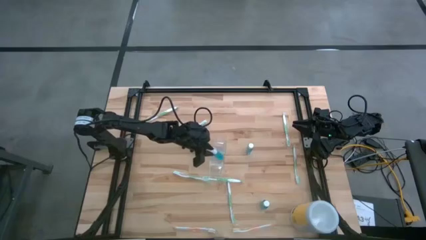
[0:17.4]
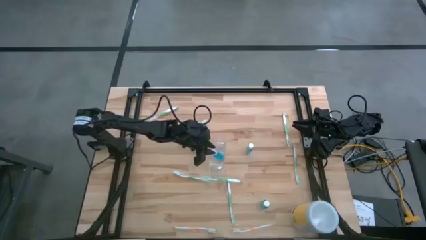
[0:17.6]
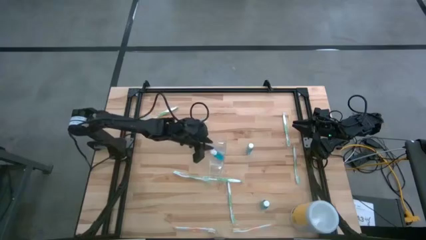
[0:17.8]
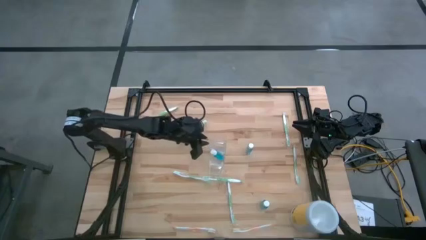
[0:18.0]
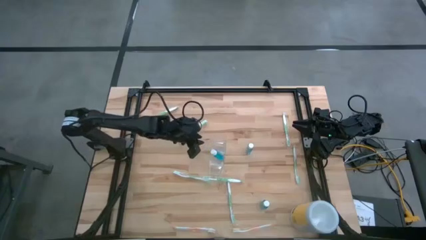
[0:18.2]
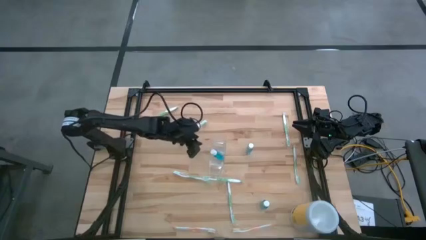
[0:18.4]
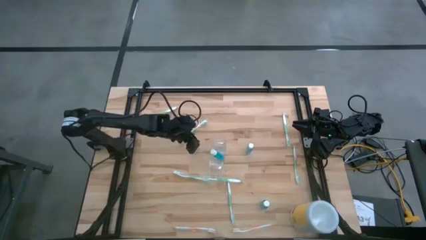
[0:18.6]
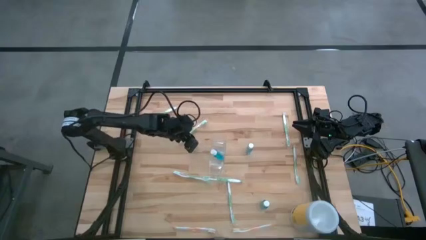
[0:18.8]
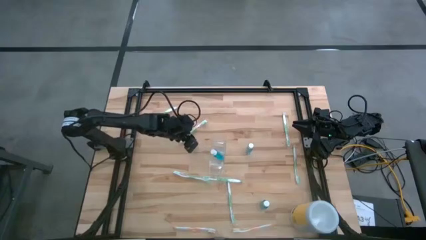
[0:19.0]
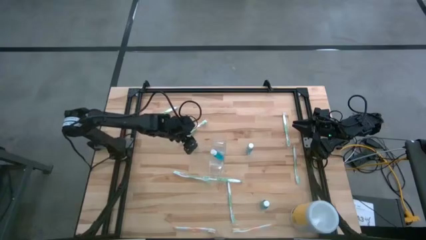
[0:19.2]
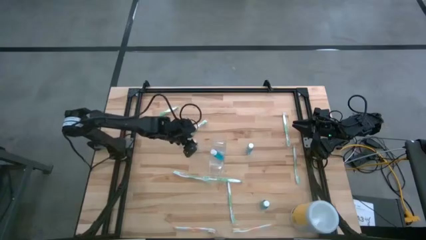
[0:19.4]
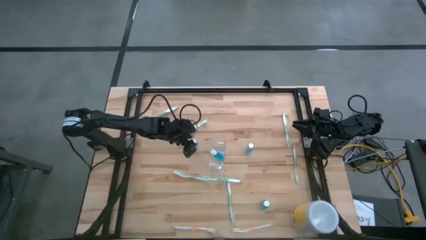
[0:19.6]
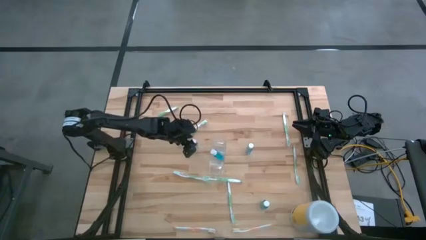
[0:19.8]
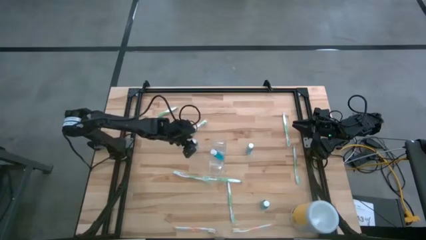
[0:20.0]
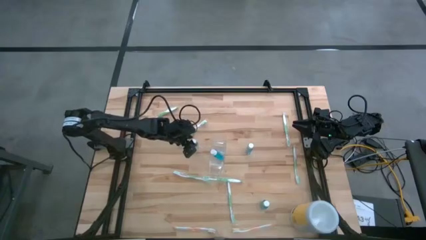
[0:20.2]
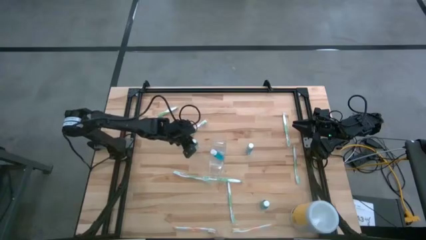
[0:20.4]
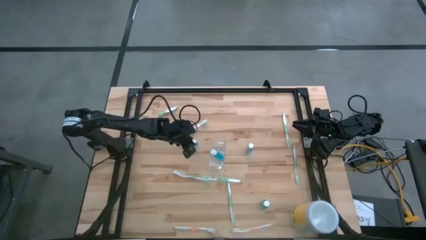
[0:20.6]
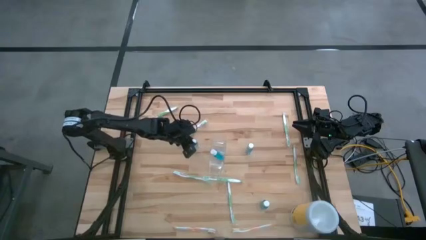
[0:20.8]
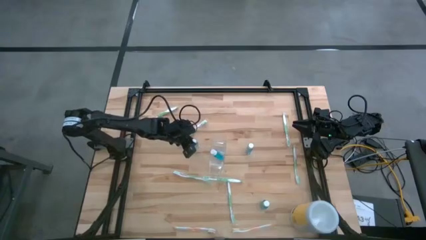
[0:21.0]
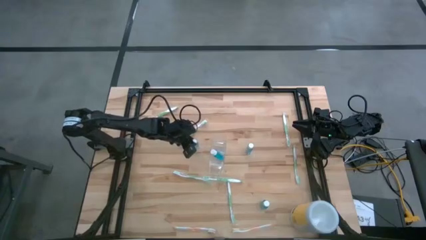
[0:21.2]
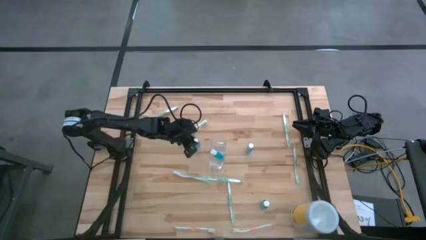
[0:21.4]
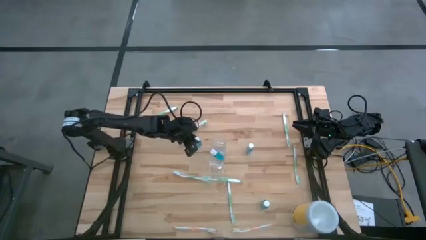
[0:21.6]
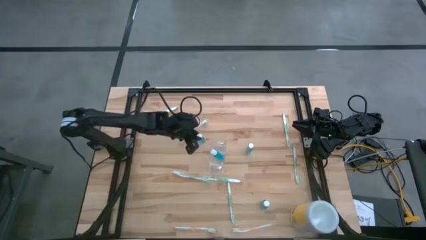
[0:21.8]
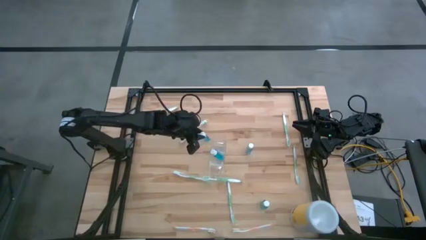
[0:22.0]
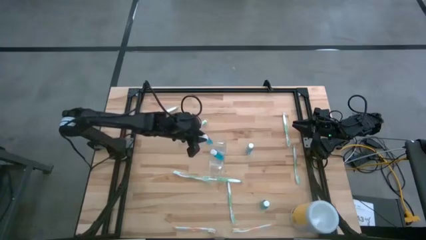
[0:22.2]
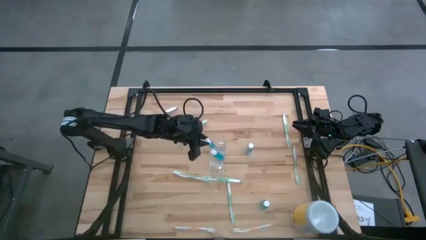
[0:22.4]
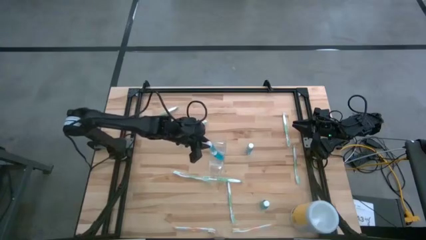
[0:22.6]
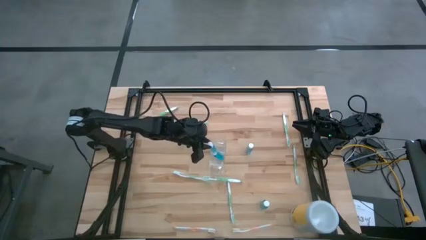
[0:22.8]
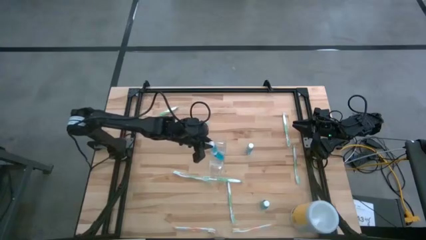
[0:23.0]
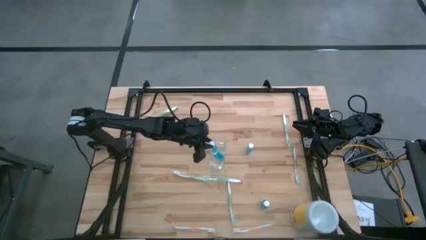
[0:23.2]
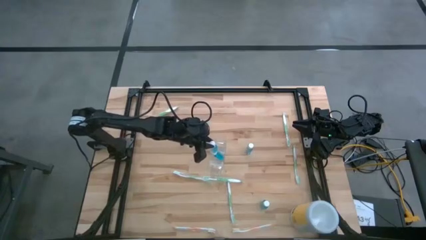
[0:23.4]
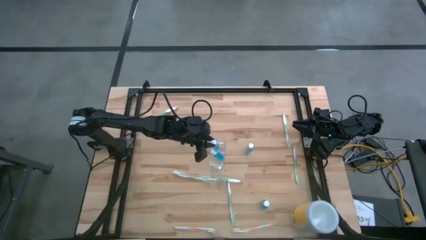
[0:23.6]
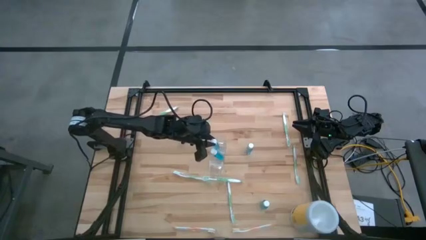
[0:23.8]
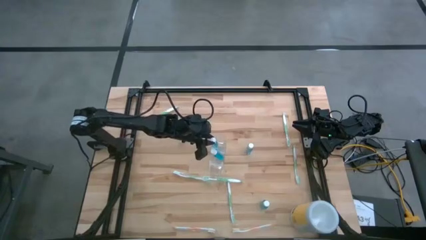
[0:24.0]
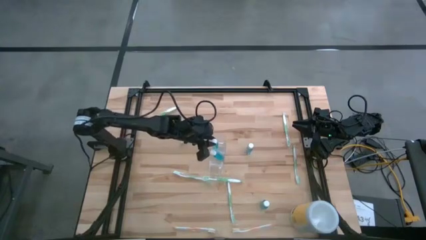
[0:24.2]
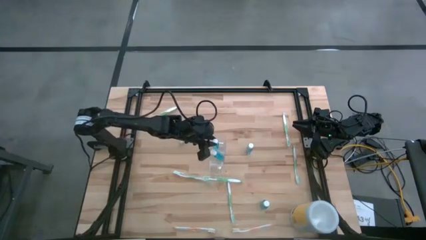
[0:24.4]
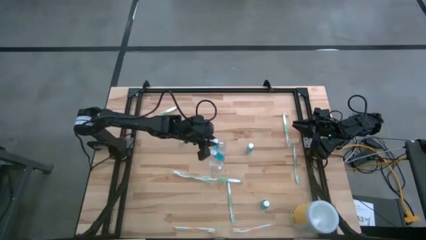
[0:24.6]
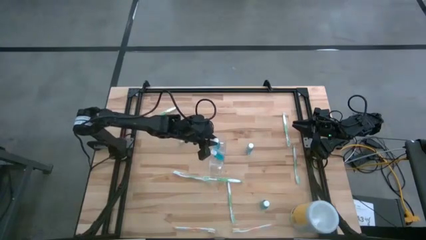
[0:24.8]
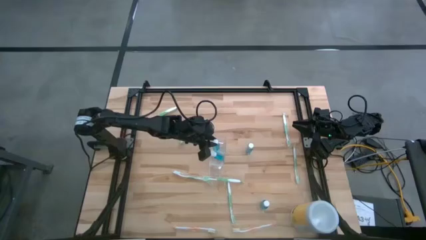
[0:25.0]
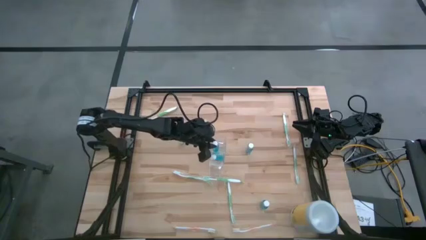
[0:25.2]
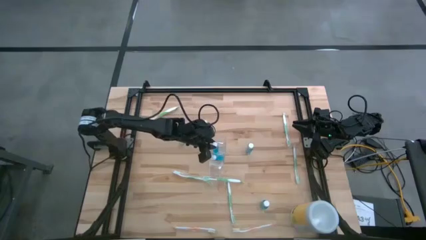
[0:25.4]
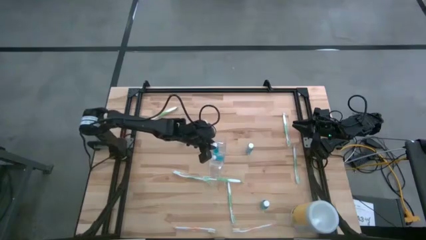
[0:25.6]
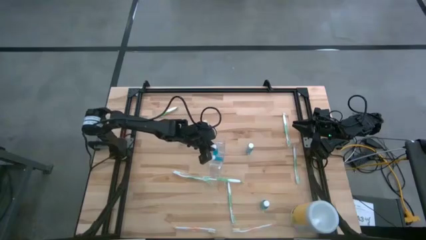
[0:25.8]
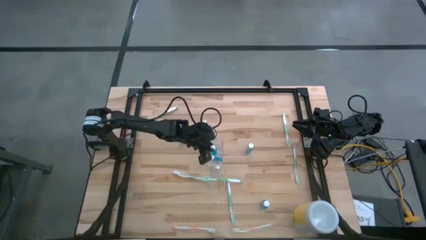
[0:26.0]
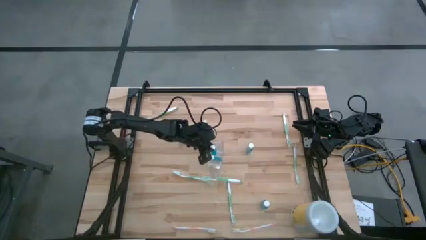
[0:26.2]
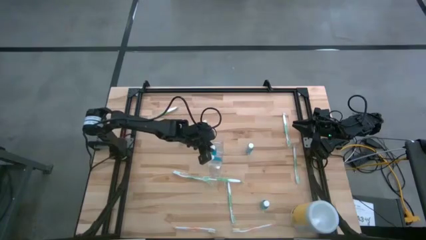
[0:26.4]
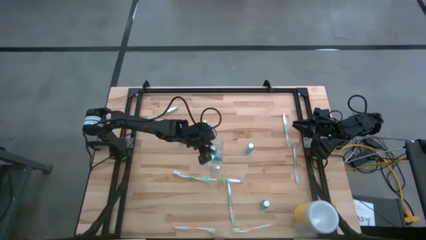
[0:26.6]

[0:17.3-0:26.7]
Task: Pick & Place toothbrushing station
Put the blue bottle into the middle of the transparent organizer

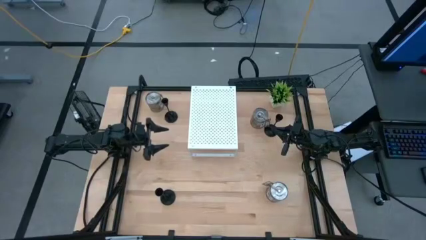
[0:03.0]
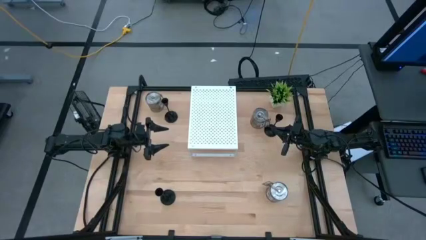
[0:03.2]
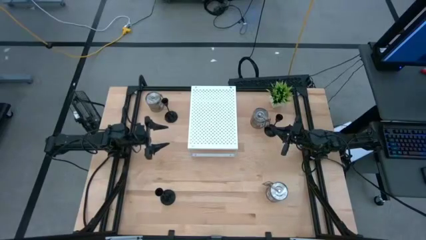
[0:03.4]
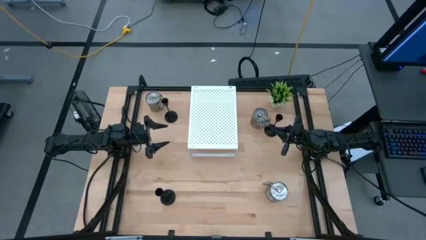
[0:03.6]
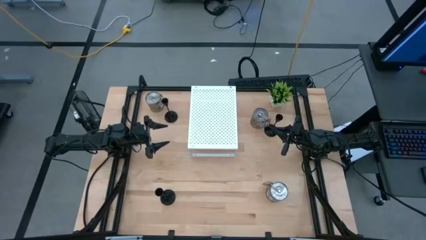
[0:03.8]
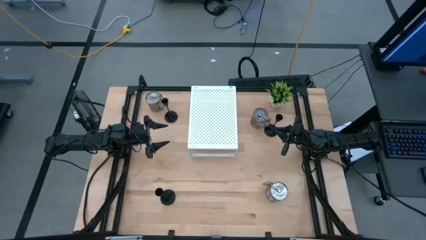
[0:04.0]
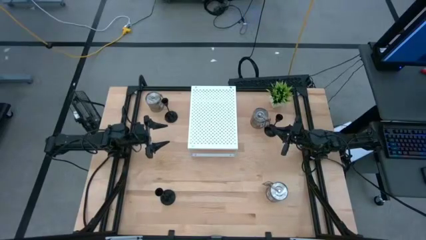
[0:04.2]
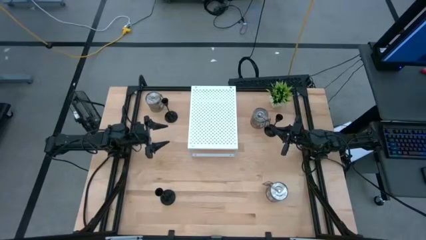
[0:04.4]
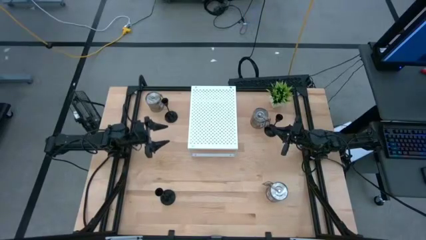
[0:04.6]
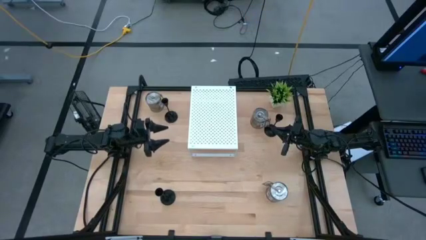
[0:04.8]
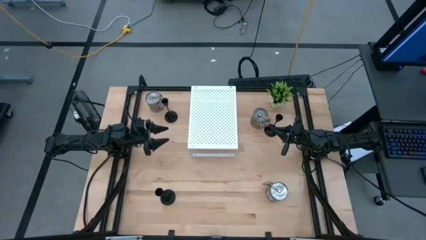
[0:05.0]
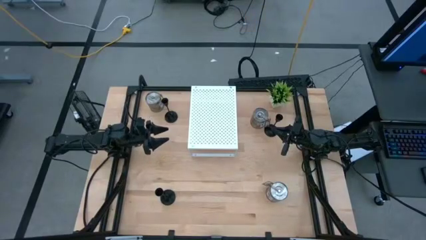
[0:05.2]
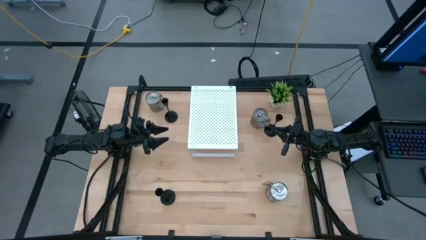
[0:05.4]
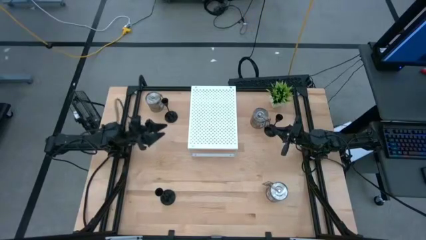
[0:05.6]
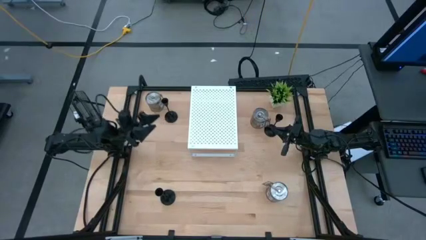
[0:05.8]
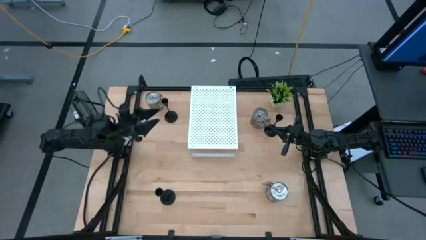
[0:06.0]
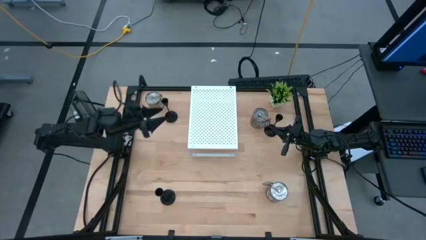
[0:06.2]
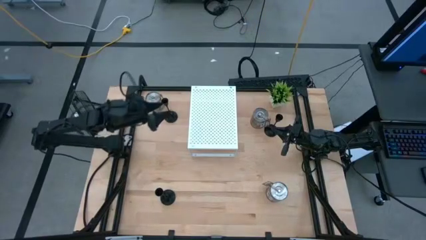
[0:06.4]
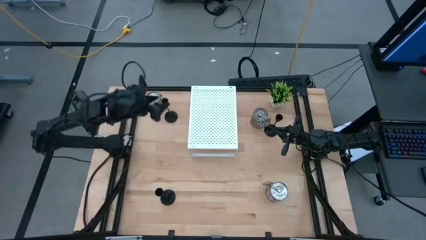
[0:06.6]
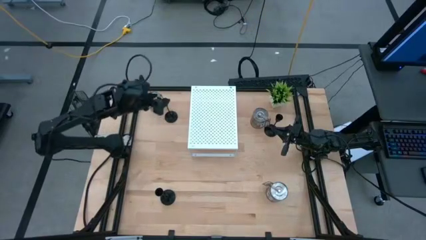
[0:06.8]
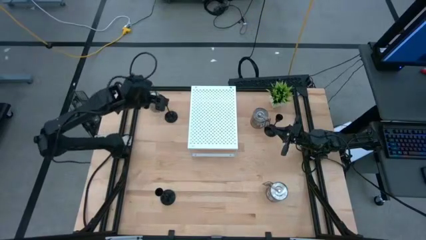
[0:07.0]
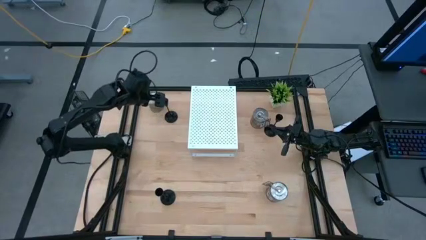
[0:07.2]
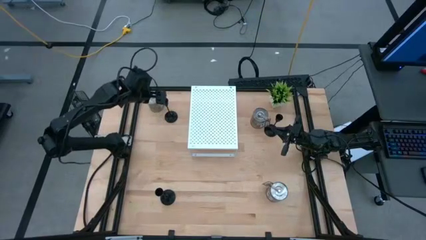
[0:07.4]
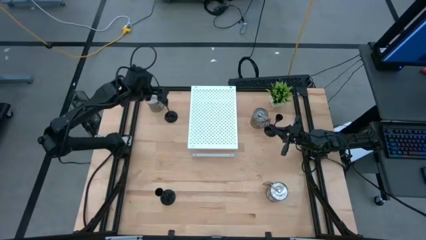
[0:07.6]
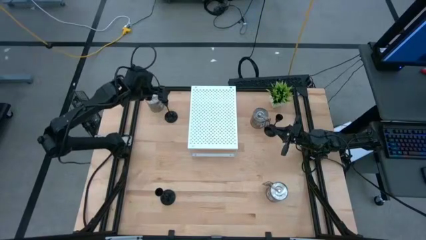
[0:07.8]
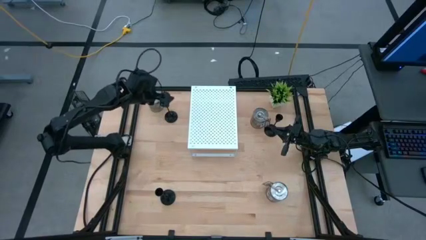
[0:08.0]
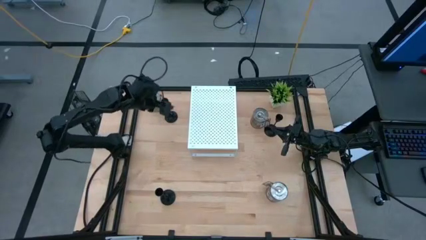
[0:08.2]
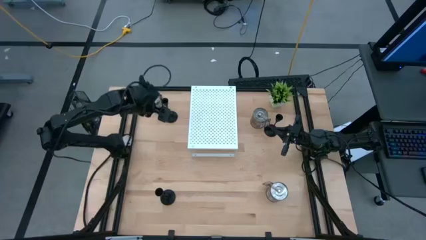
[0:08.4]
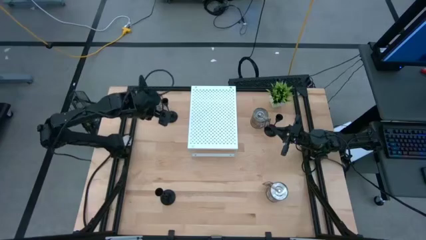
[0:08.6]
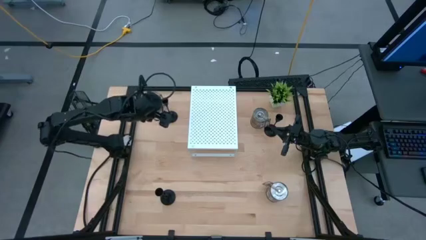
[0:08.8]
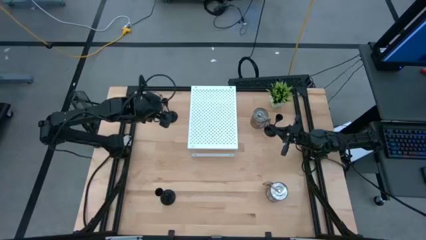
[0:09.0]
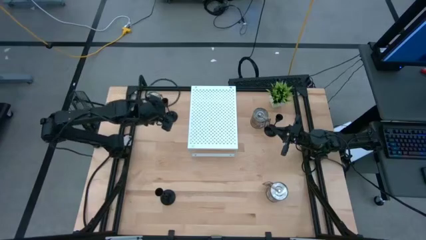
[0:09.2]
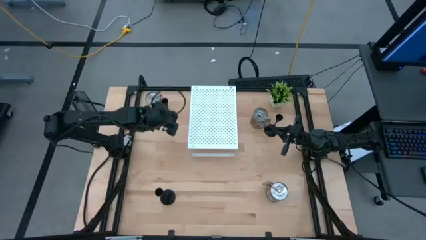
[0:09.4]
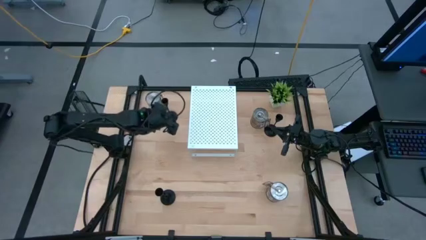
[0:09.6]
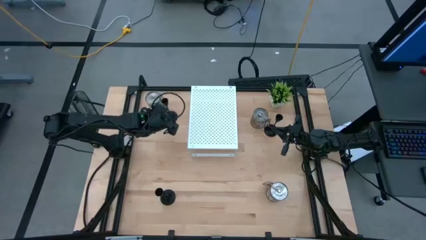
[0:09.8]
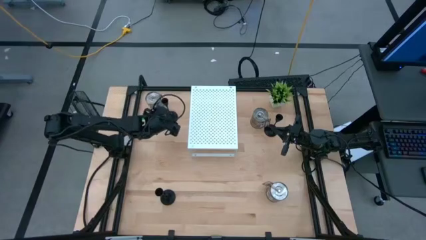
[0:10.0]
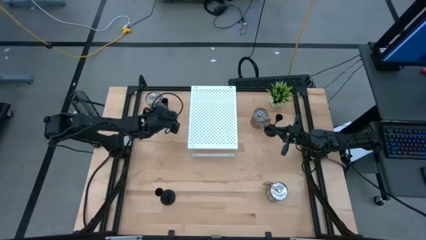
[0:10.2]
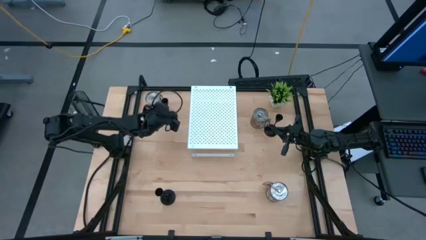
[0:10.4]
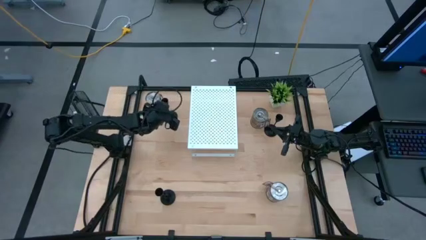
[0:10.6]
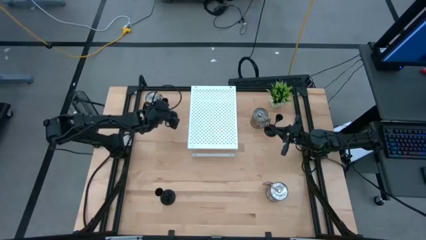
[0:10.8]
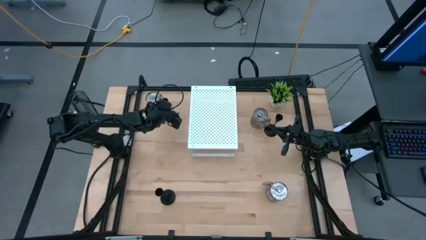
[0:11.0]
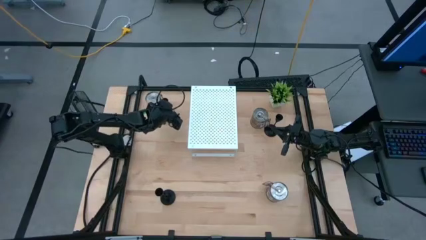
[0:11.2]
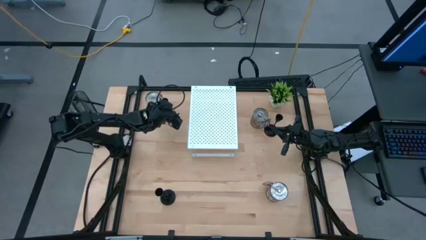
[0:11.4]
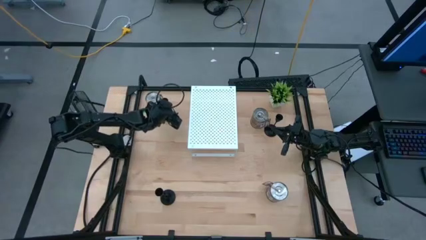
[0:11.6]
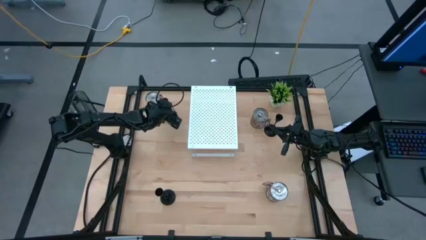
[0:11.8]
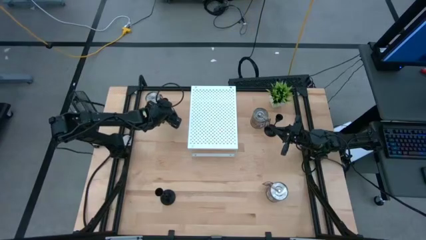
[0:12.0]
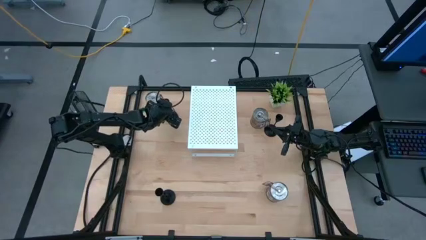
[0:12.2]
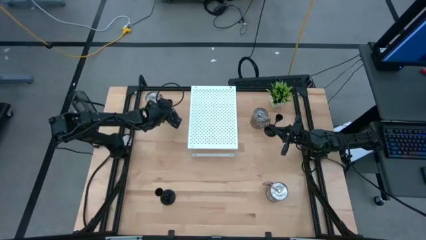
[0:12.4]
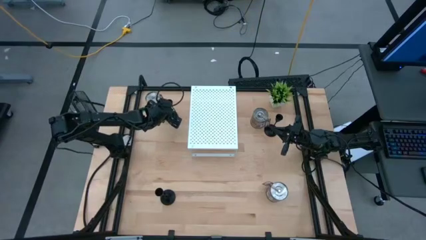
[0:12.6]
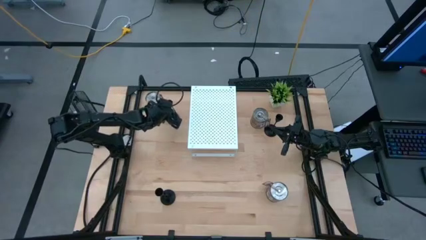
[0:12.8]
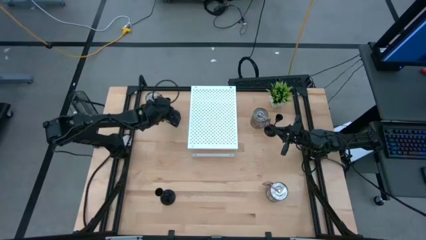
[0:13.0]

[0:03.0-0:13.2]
Task: Pick & Place candle stick holders
Put the top left black candle holder on the shelf
